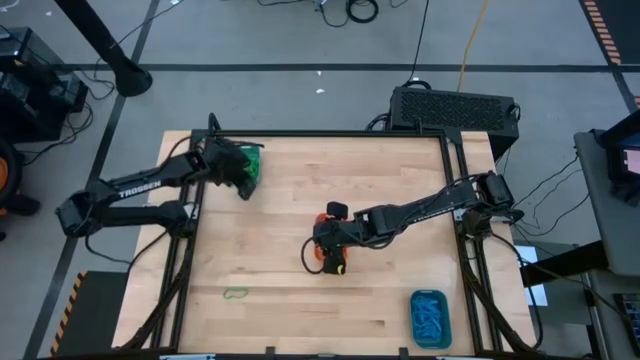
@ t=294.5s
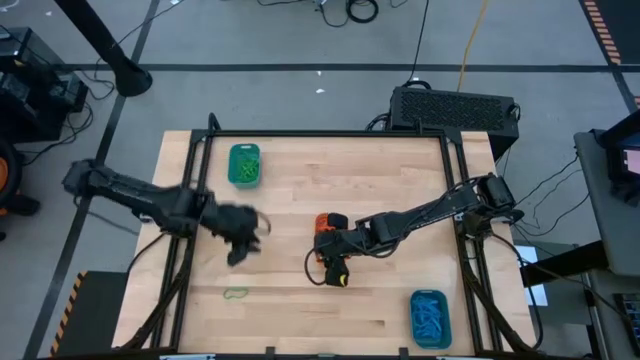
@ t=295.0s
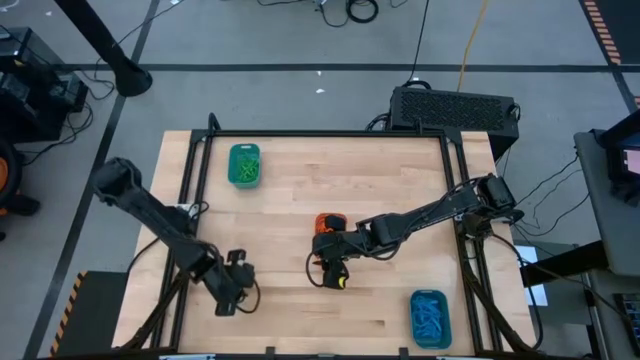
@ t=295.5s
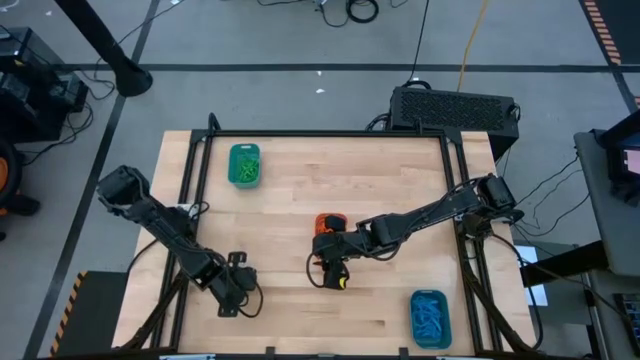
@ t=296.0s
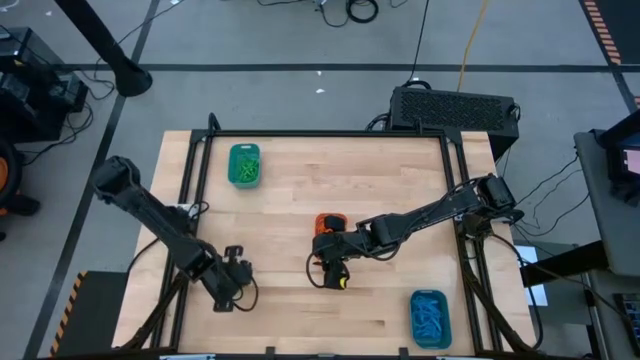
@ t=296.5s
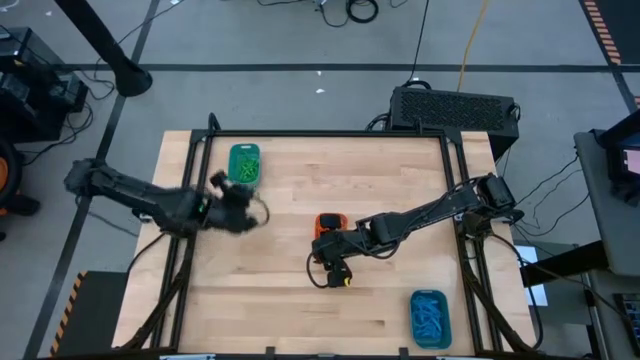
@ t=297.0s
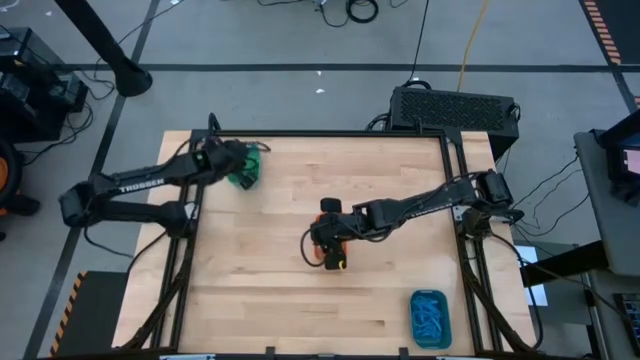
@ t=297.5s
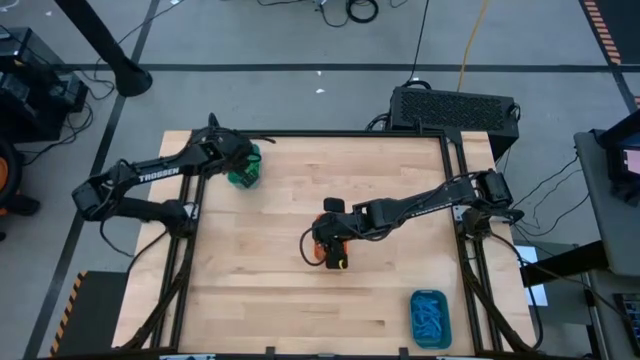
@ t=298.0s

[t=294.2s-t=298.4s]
Task: Sort rubber bands into baskets
Put the green rubber band into the green bin

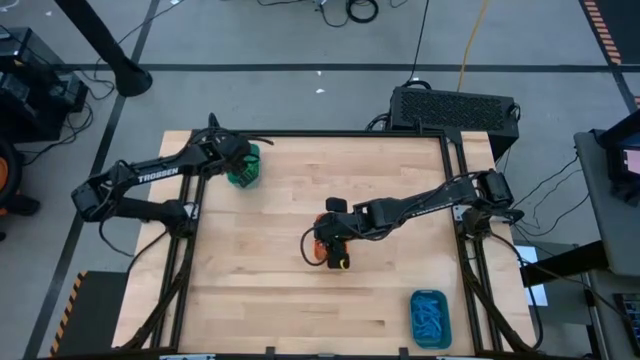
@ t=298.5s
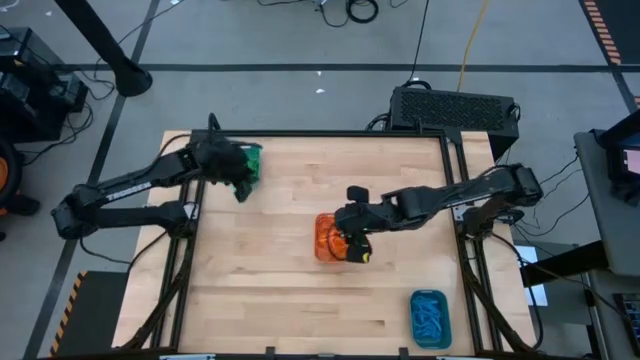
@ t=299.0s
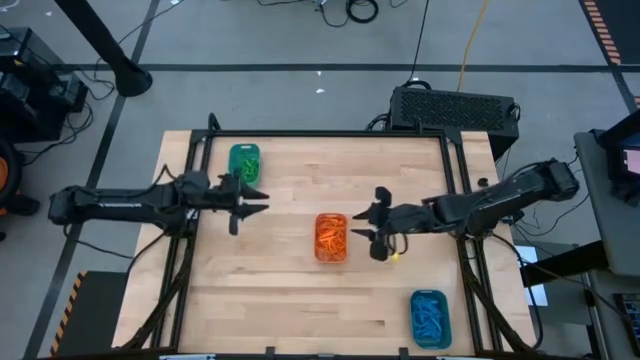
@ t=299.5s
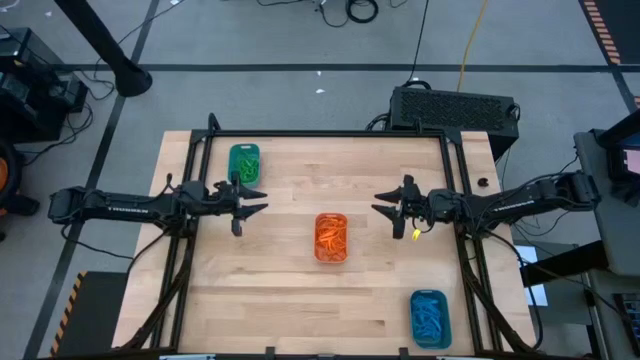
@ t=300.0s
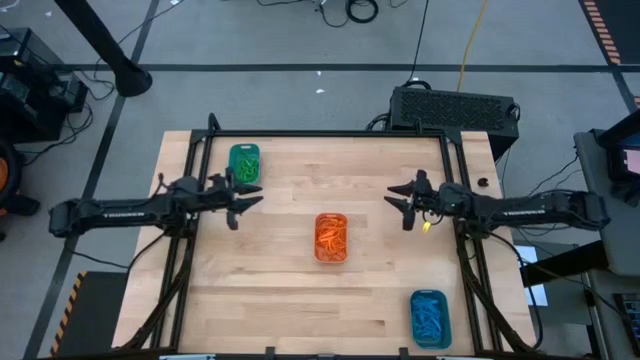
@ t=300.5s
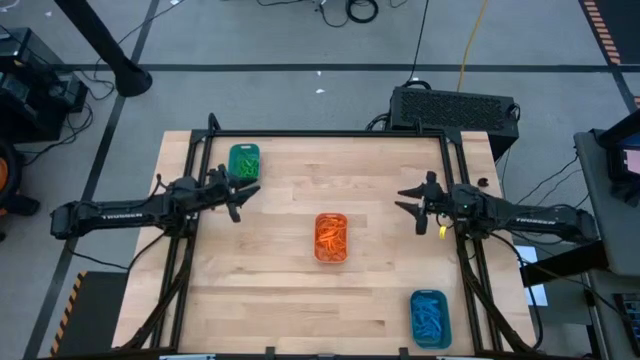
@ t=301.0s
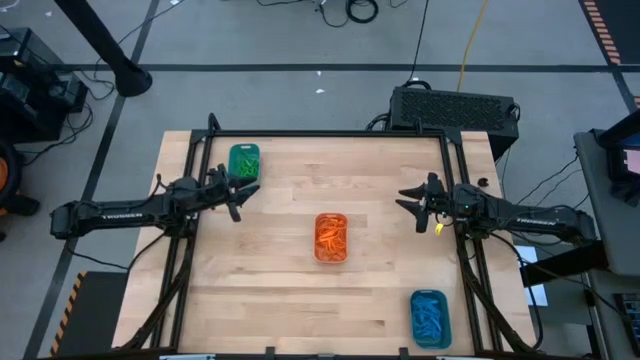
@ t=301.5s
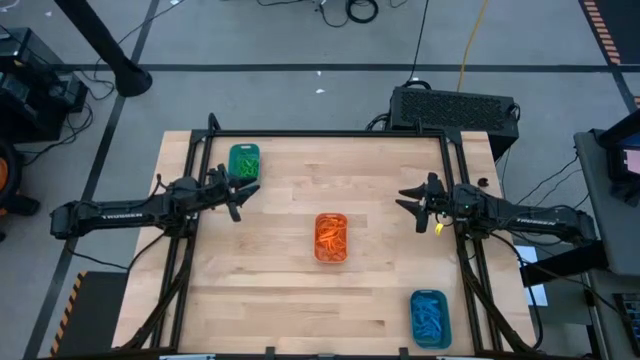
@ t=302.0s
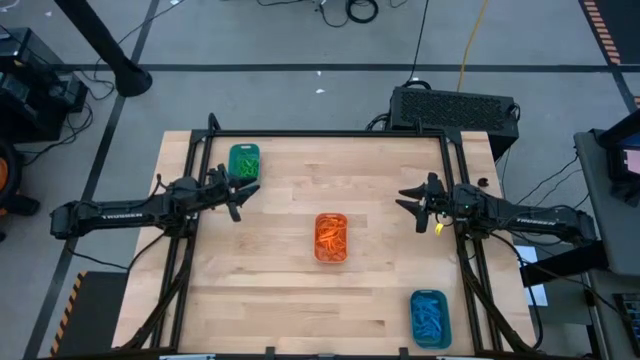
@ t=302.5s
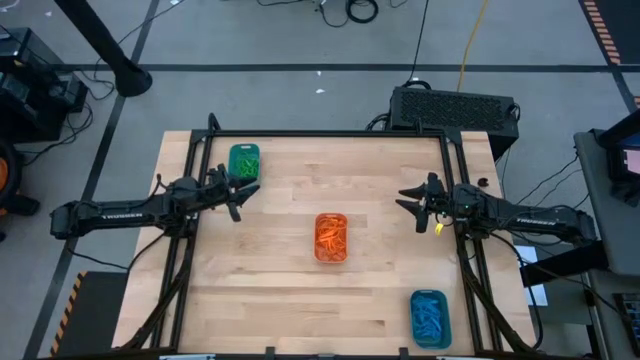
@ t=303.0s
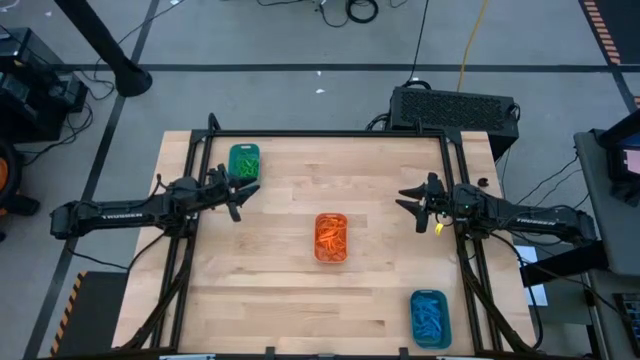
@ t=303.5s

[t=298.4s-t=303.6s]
Return to Home Position

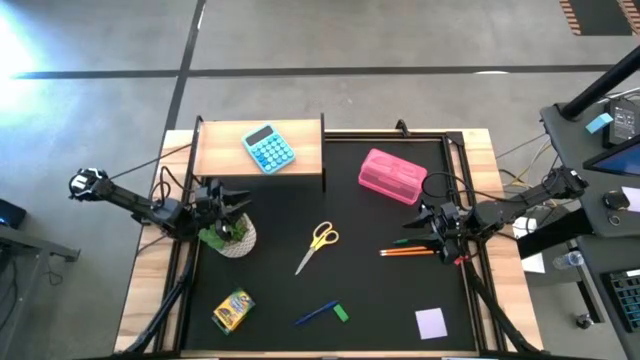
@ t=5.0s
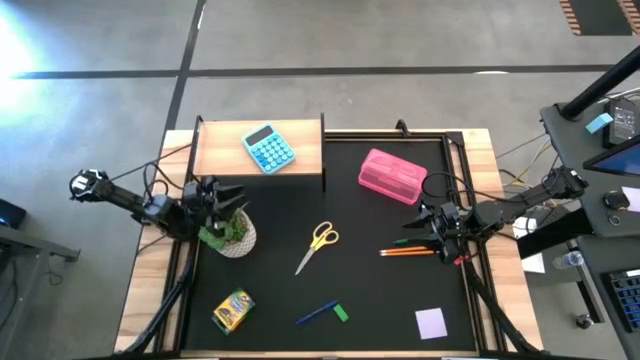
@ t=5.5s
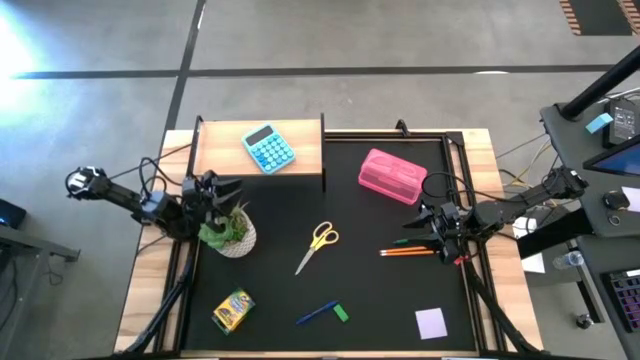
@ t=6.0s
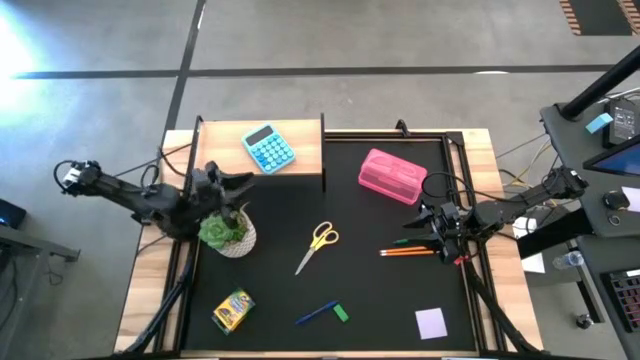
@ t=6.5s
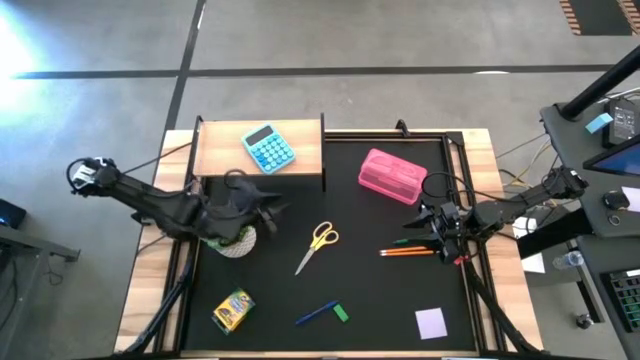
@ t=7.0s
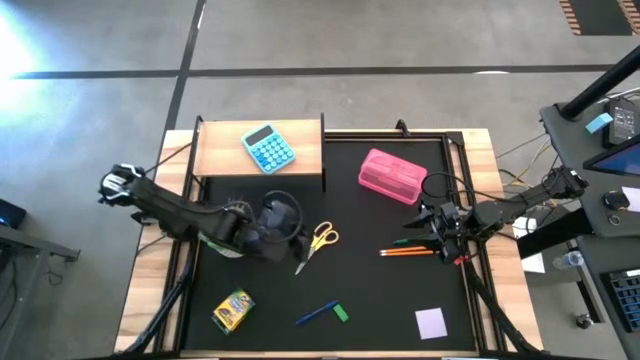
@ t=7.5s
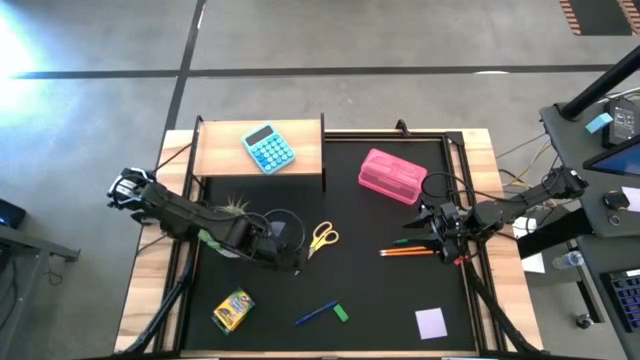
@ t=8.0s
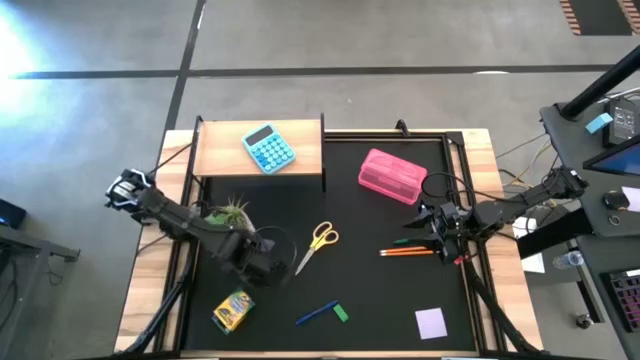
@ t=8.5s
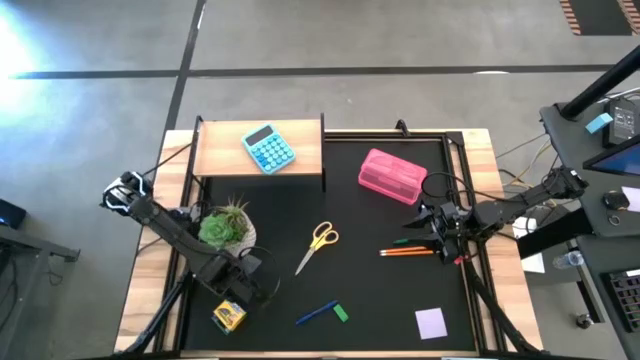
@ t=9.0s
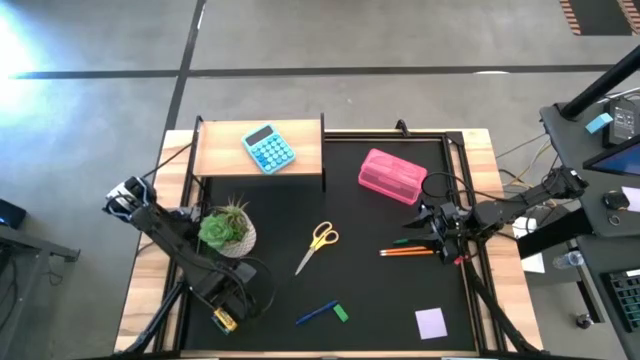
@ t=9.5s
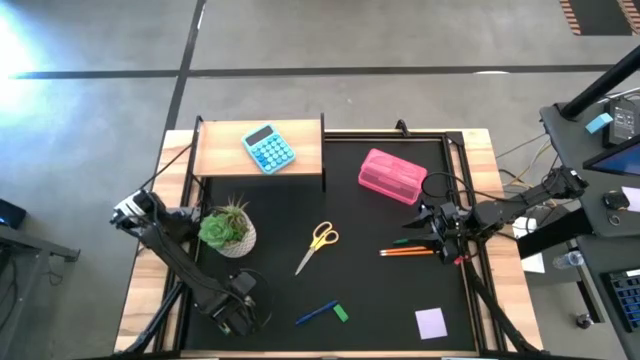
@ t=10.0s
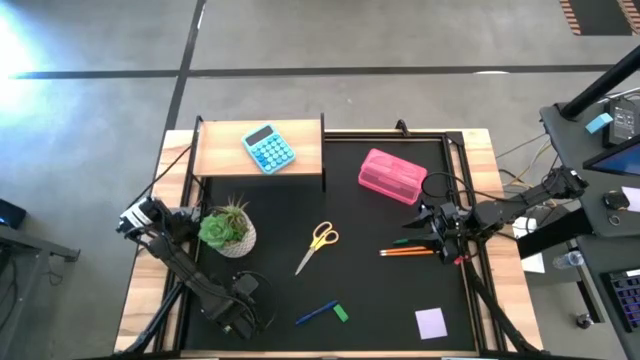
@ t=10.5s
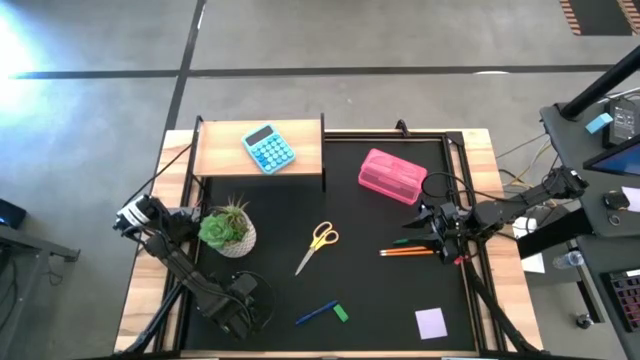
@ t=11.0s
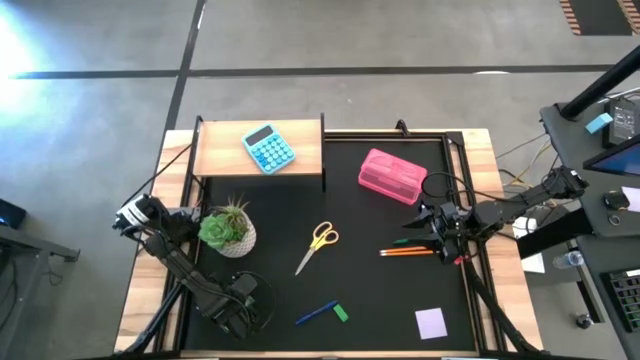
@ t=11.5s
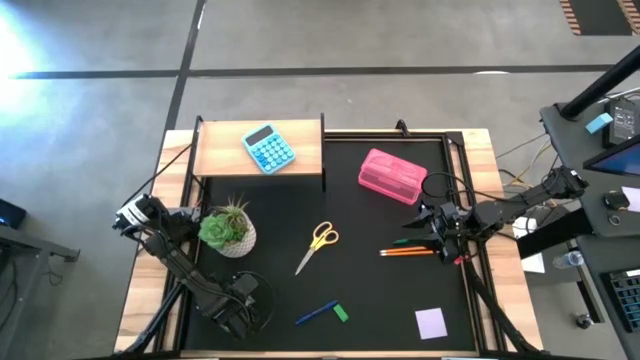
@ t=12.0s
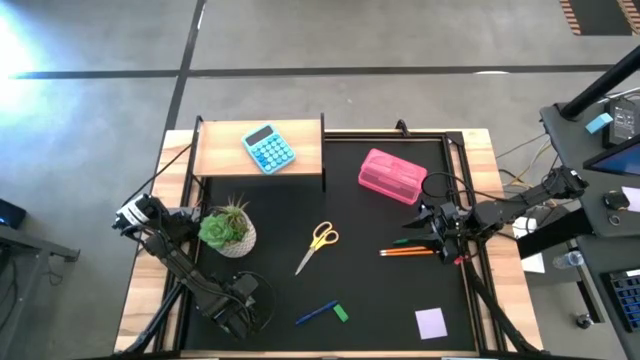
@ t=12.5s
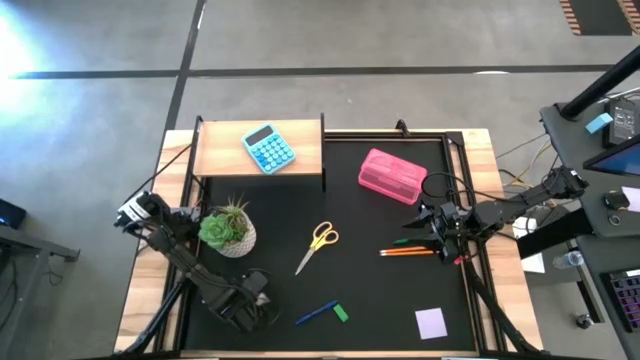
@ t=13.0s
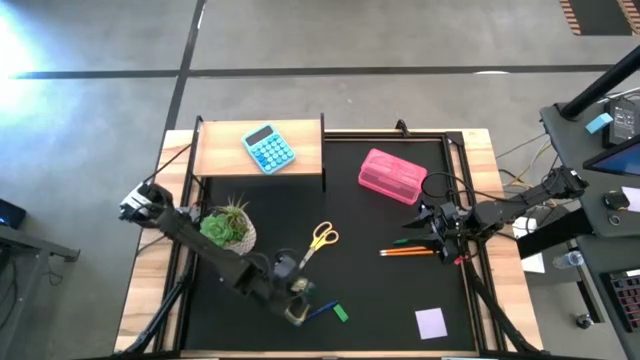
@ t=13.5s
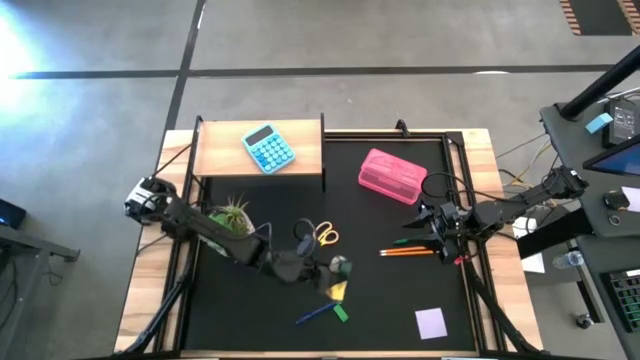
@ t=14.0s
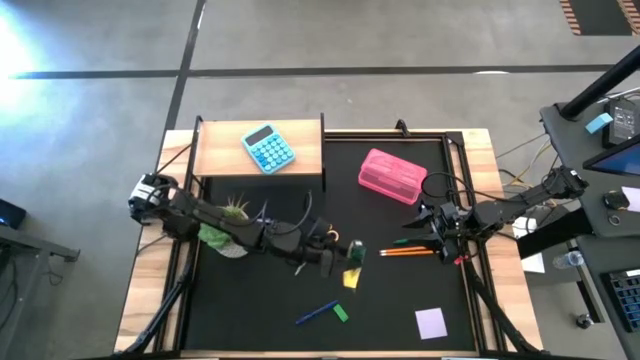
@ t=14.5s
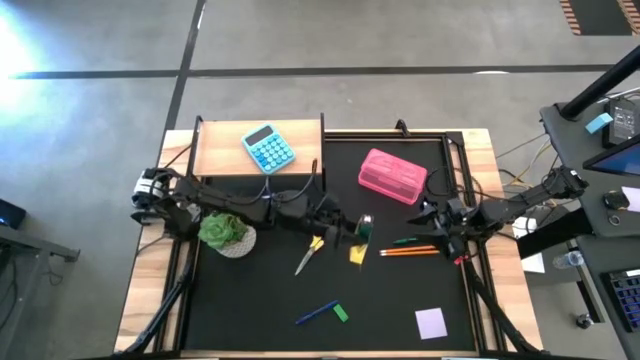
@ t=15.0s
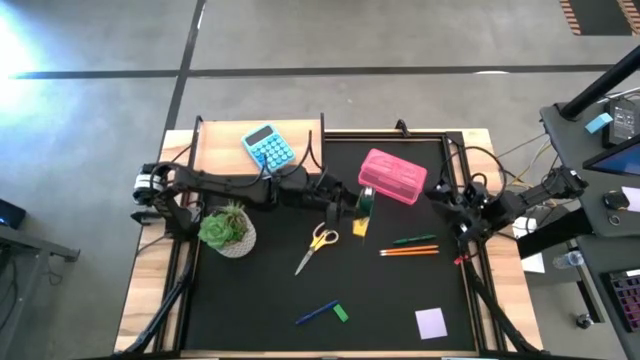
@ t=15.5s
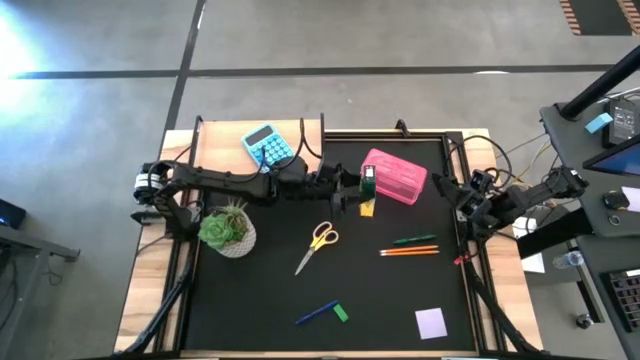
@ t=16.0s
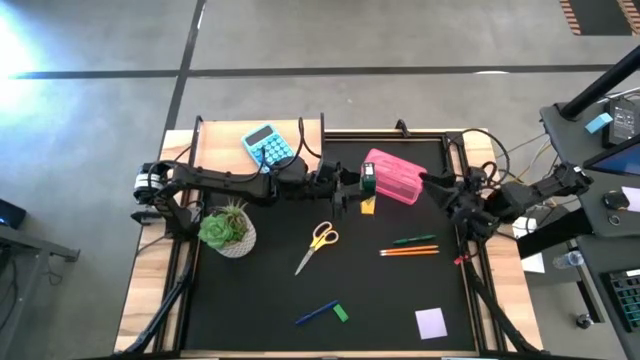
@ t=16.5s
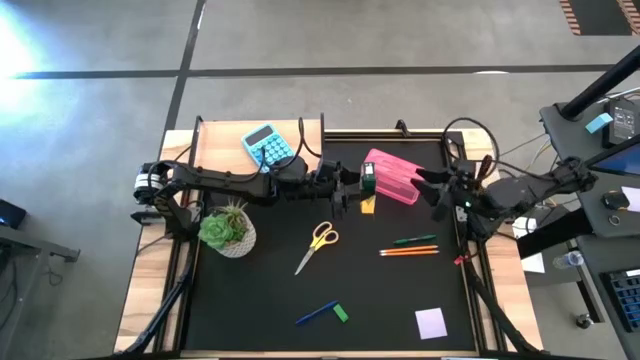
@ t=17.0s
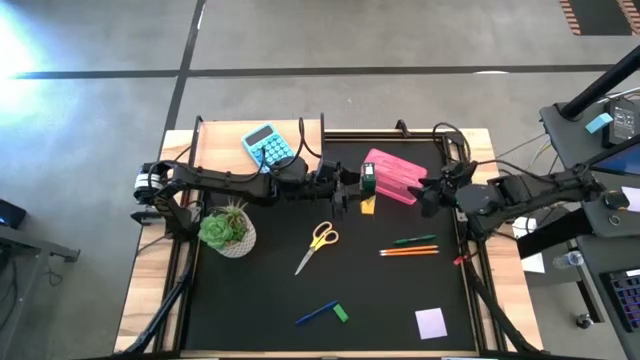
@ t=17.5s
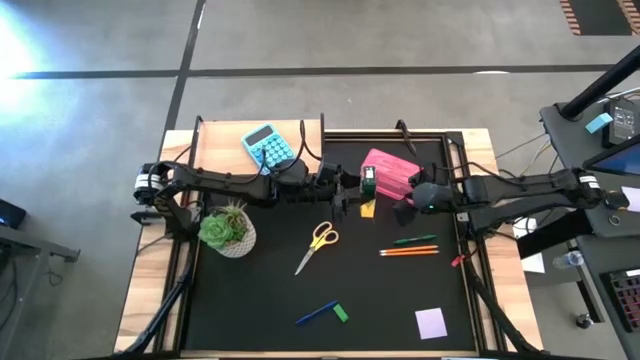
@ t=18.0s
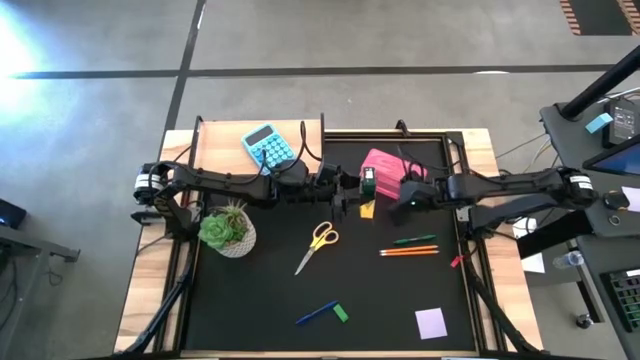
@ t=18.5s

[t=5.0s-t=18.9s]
Task: Pack school essentials
Put the yellow crayon box into the pink supply box
